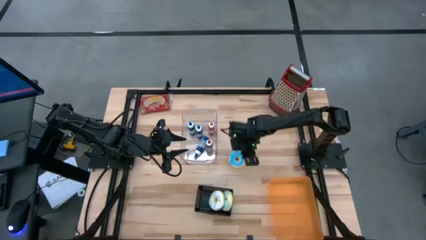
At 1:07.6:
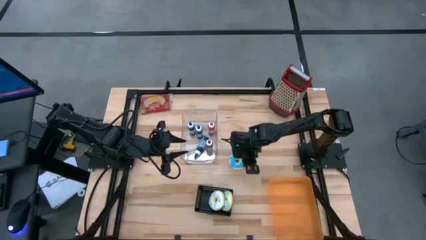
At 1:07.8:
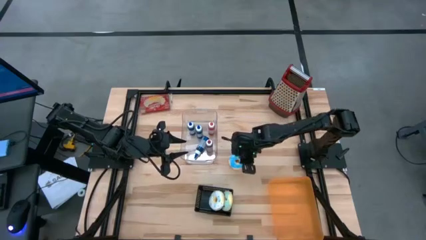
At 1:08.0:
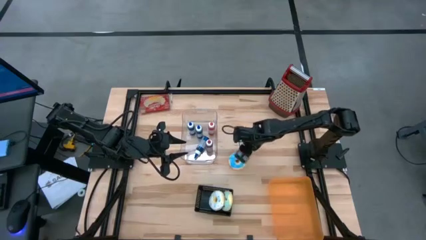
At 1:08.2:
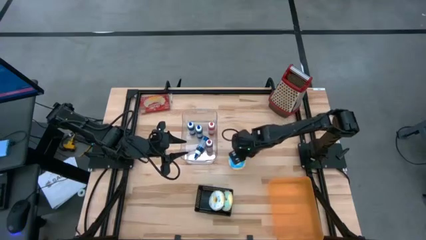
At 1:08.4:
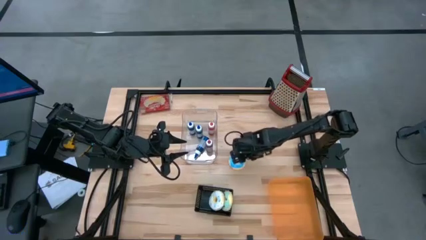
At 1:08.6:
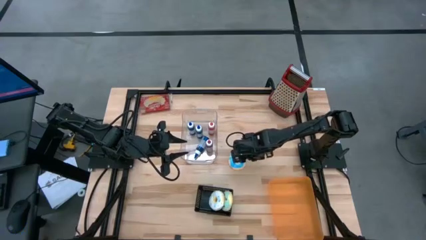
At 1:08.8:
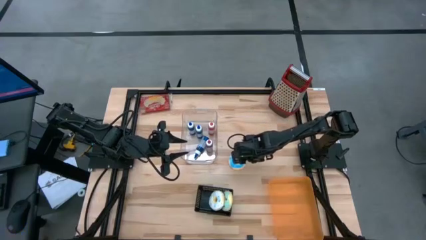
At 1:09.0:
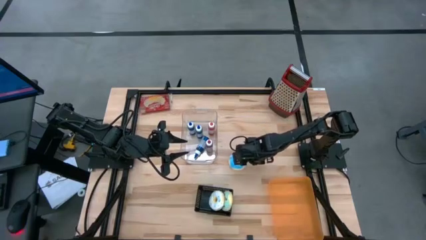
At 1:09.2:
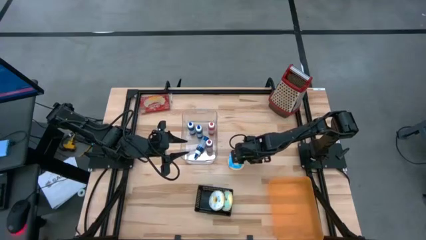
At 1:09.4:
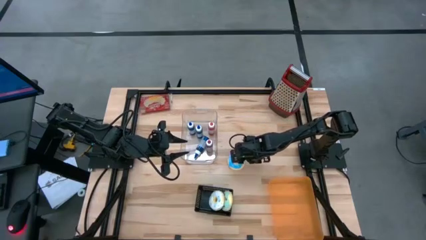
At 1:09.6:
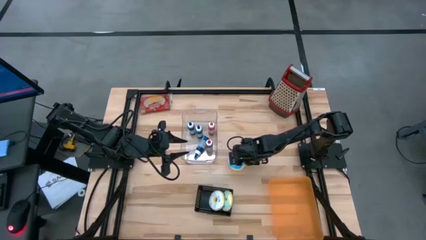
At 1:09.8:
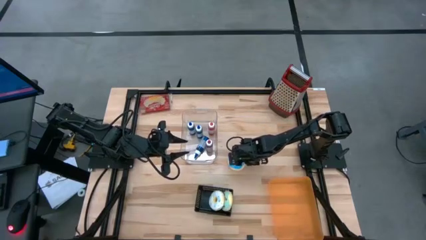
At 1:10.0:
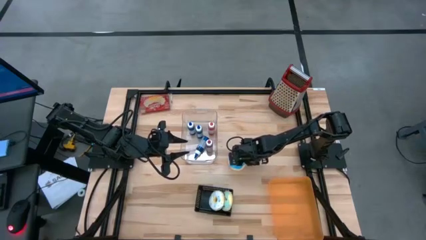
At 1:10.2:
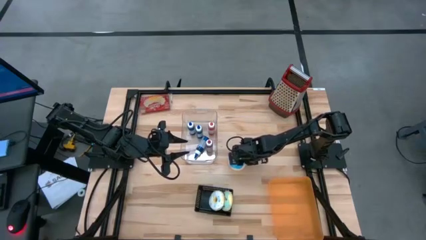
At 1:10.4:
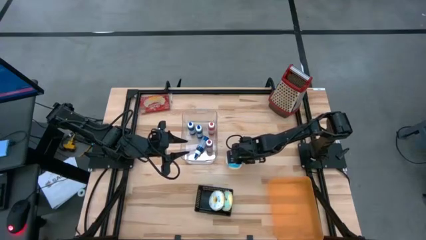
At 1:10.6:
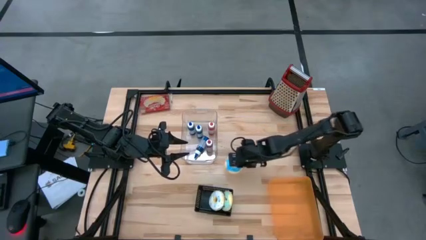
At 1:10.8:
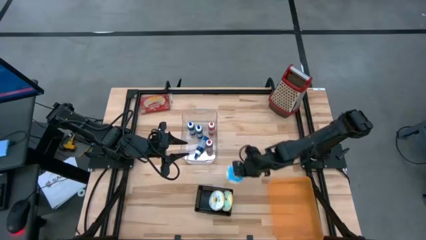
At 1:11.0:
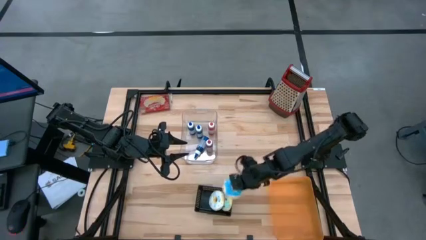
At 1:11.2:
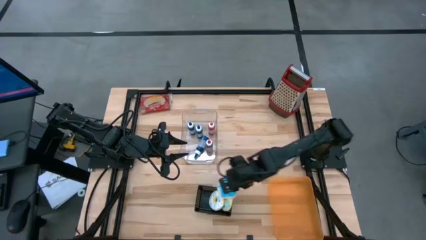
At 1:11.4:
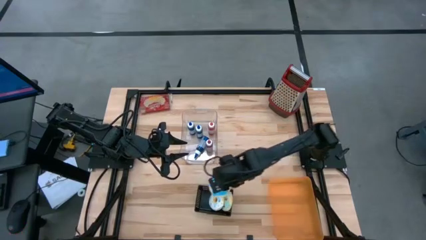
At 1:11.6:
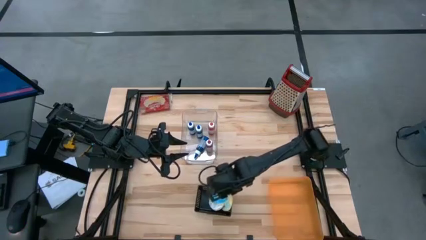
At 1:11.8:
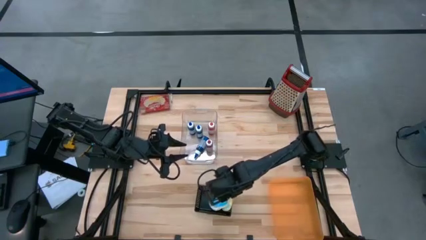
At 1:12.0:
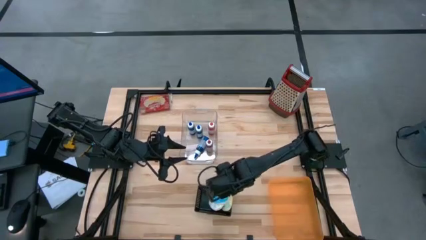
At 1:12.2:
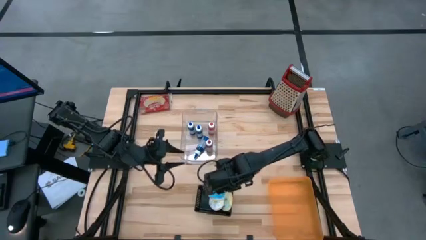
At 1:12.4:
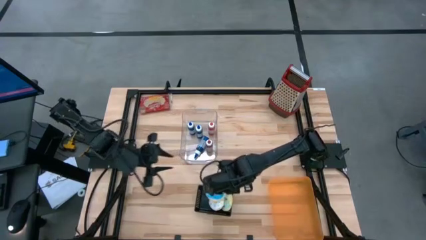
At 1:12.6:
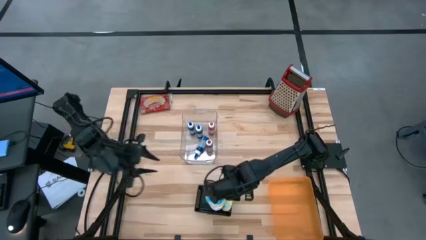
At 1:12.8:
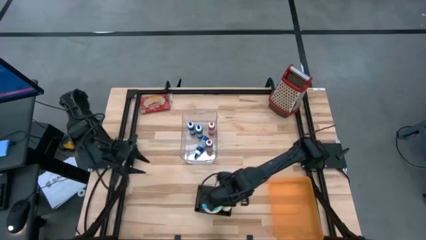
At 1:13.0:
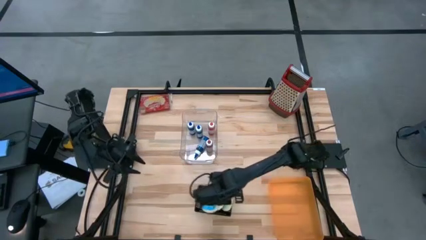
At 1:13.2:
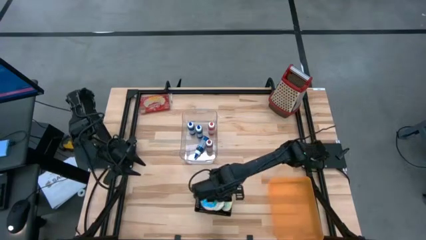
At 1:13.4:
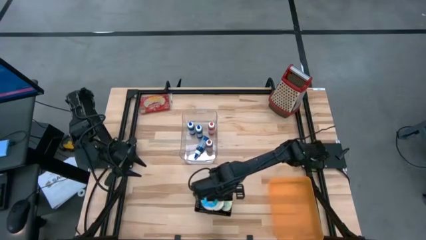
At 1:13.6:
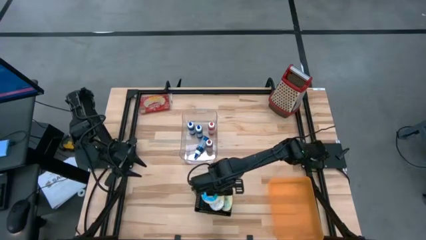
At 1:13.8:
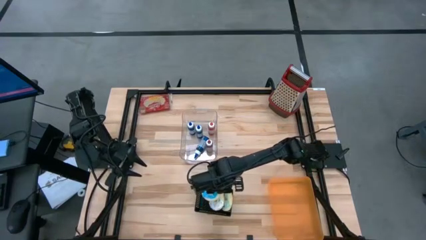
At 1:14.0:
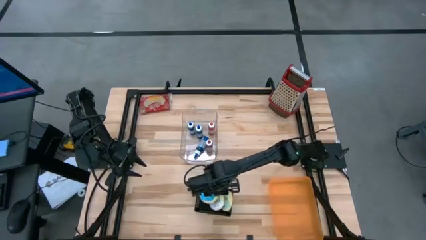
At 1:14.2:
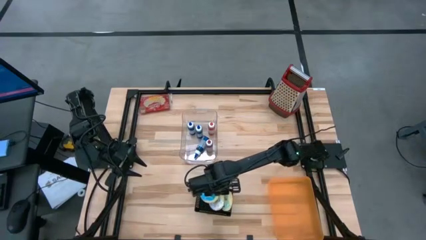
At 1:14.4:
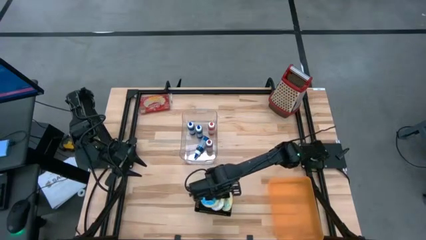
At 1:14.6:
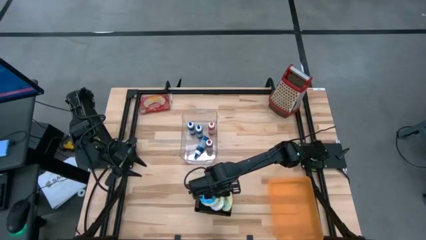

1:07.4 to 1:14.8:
Put the blue donut into the black bin

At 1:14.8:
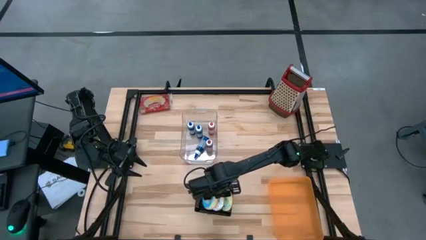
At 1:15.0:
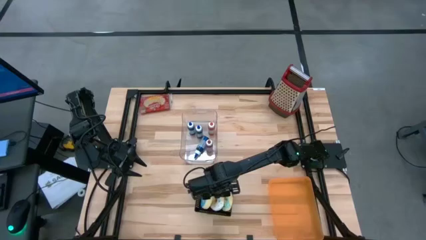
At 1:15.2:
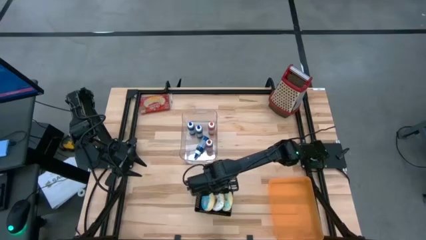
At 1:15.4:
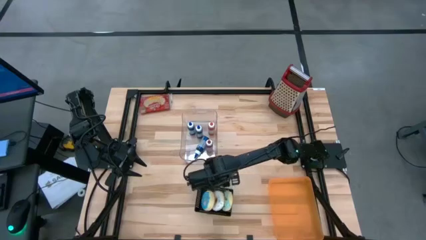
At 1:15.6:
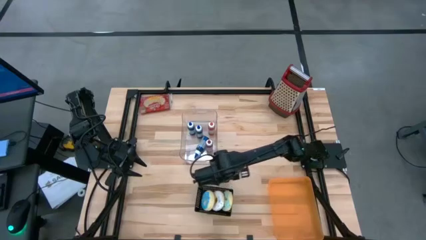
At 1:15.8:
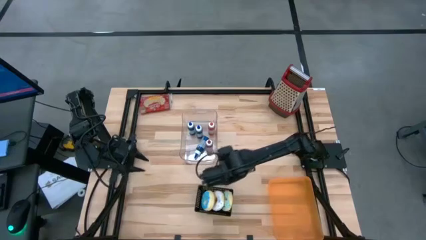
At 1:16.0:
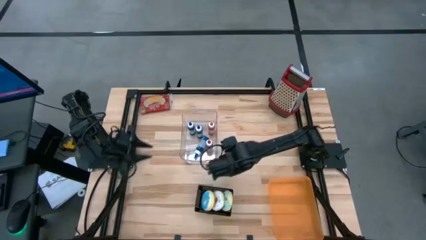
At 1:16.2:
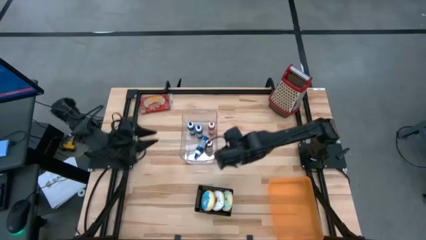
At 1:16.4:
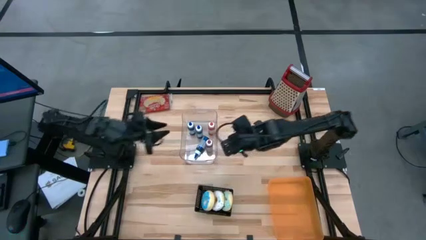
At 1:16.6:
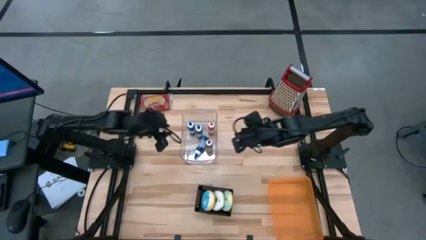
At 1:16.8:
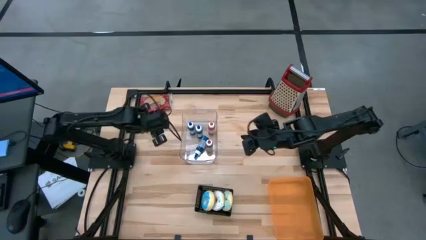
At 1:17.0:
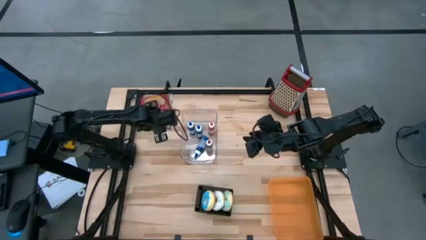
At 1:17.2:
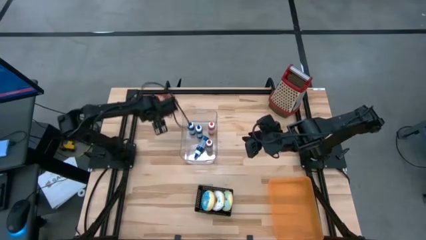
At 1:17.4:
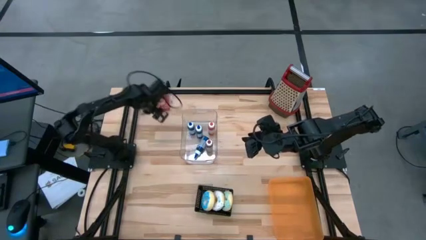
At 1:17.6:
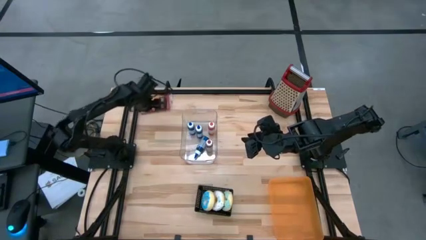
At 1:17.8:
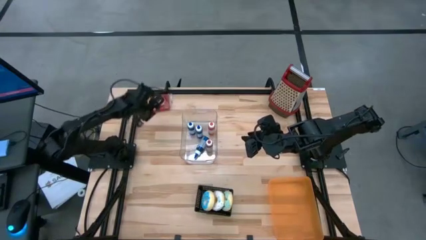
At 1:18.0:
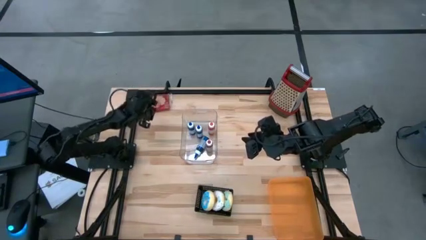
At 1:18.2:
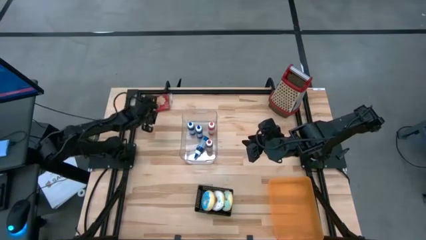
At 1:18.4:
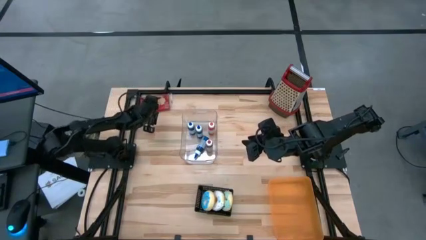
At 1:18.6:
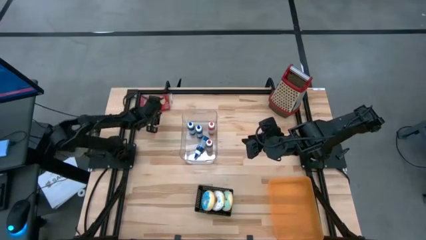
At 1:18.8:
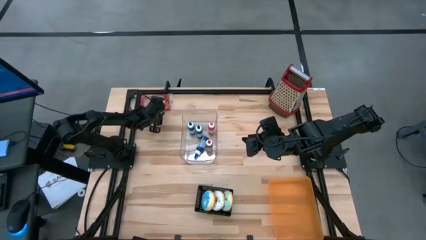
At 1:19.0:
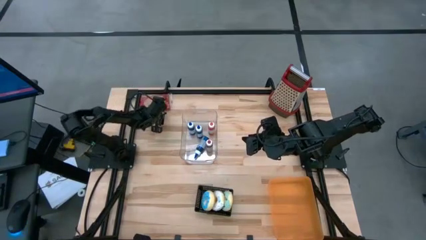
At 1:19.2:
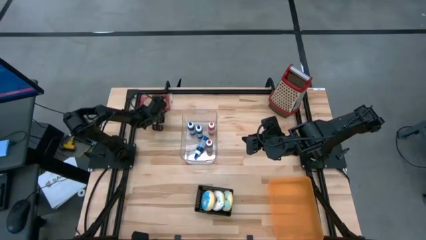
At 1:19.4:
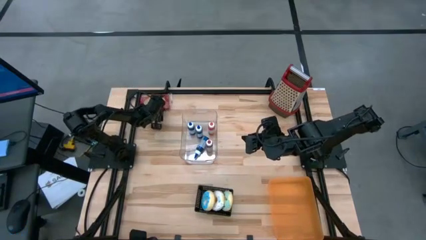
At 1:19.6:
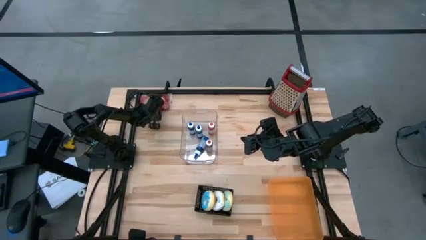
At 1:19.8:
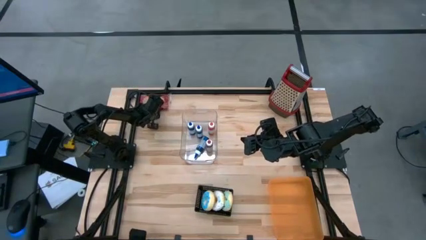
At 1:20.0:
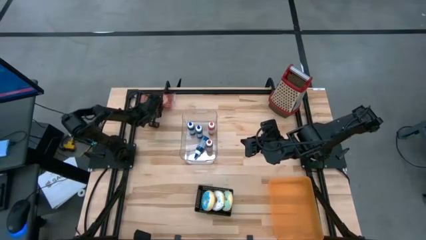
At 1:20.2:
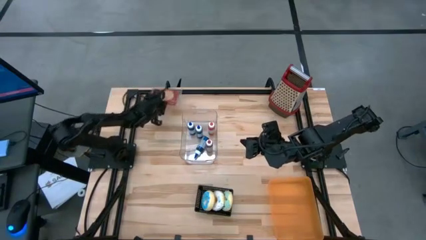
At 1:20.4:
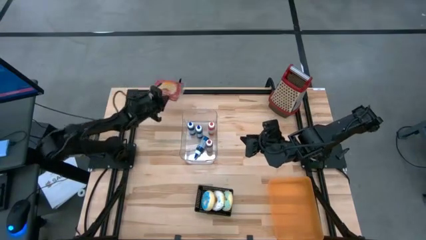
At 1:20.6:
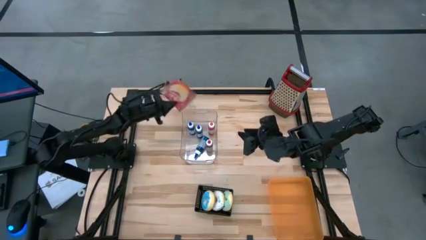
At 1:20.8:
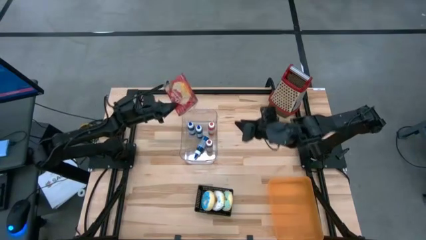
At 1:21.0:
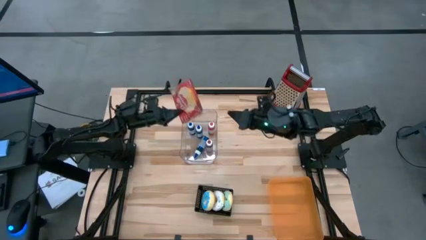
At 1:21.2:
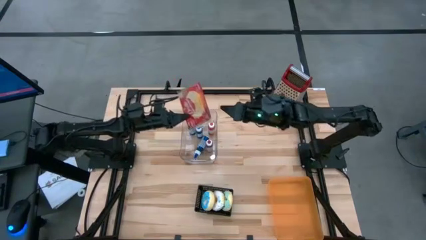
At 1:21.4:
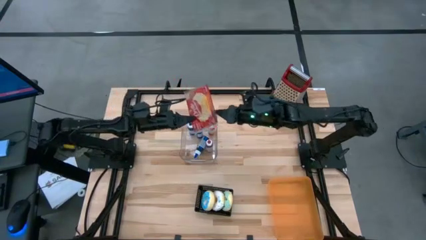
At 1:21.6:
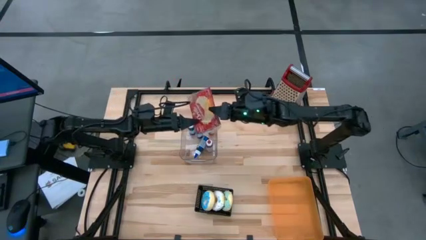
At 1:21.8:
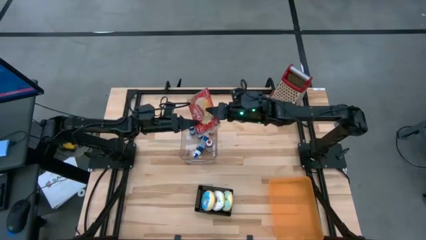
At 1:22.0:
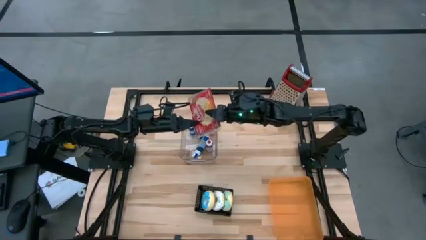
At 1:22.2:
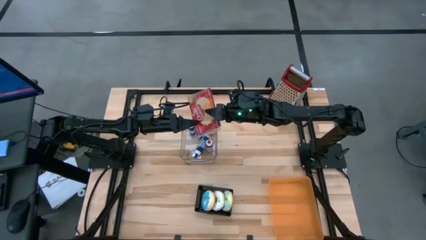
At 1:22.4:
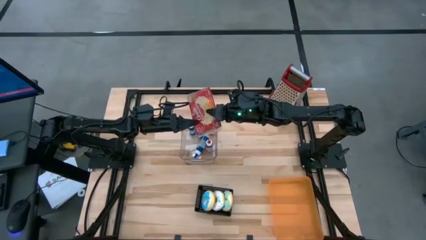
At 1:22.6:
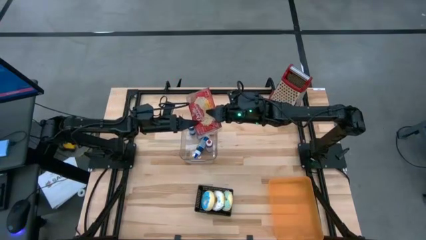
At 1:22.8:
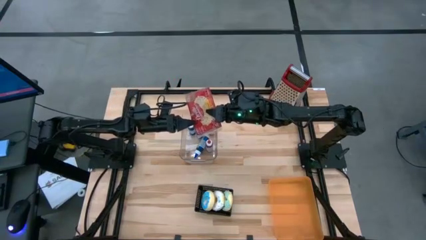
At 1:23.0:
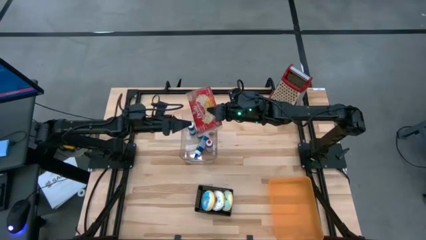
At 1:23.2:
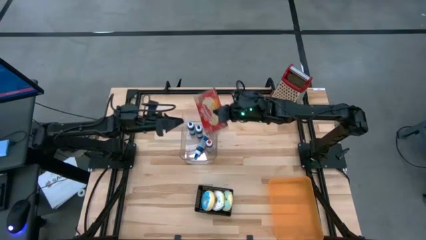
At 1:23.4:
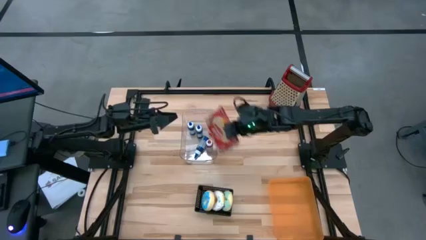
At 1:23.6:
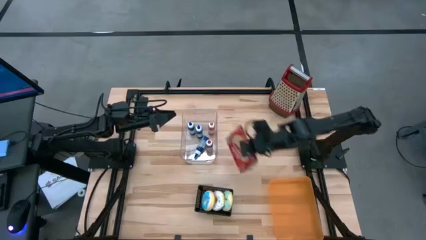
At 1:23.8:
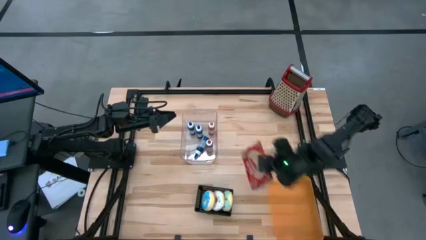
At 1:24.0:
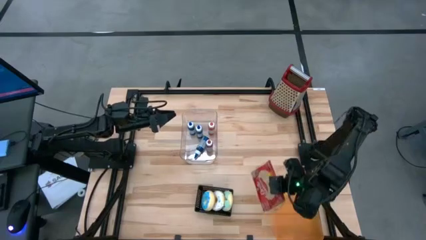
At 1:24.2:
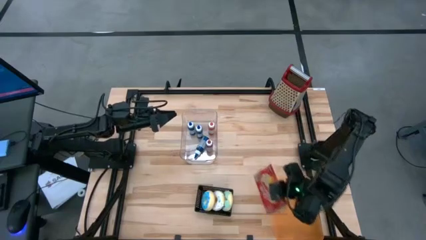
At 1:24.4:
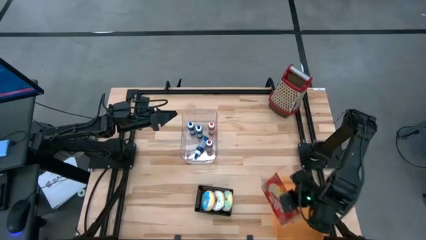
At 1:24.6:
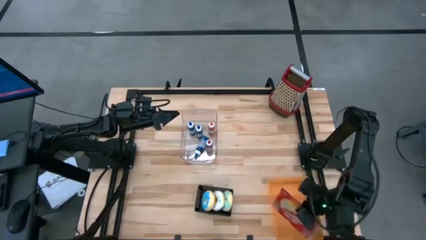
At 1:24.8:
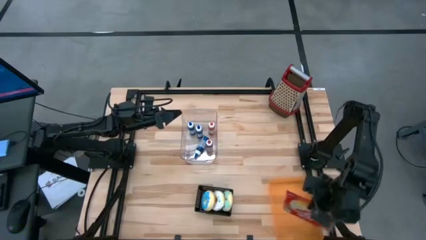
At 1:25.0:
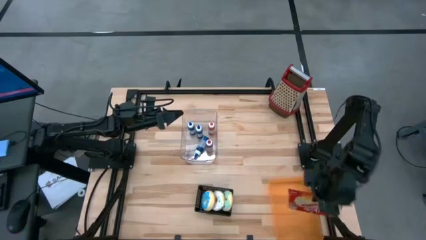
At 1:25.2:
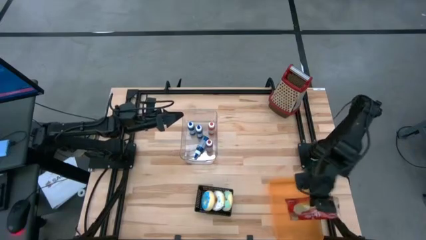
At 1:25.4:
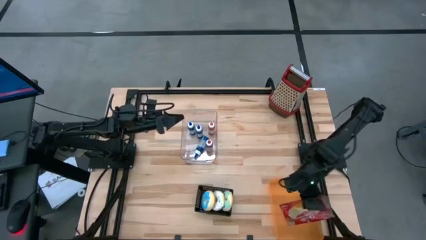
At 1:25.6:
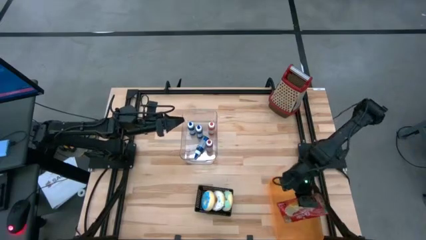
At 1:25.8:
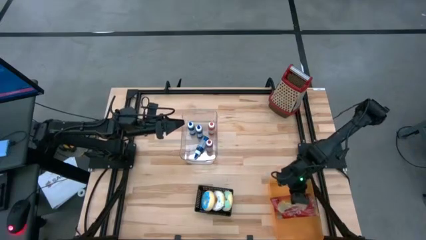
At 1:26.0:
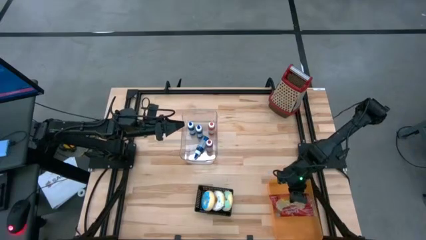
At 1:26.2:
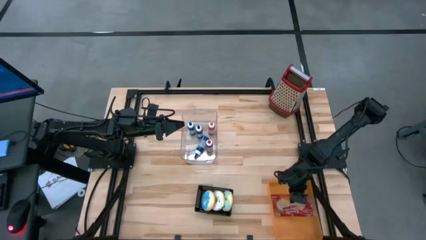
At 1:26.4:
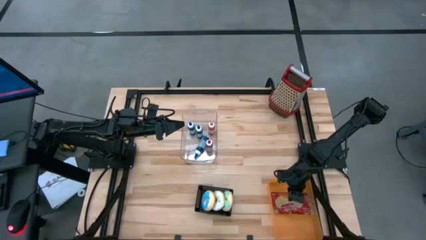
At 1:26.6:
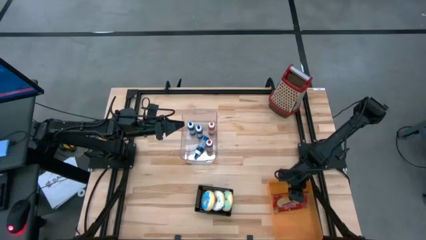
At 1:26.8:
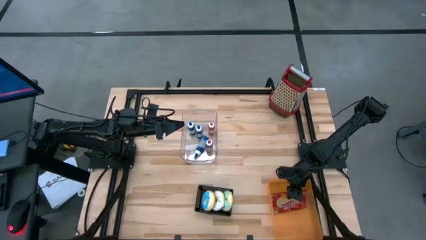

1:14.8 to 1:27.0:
Put the red popcorn bag into the orange bin
